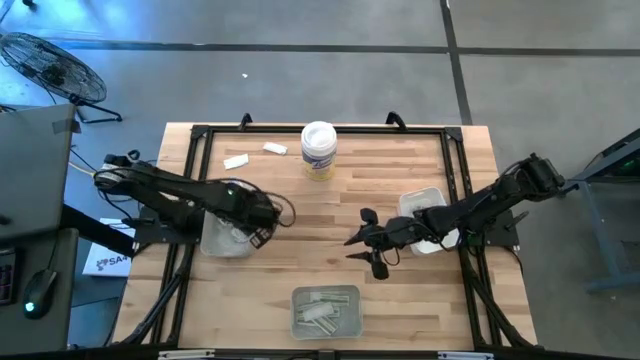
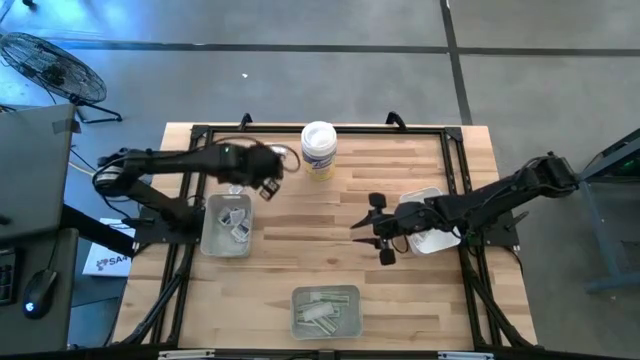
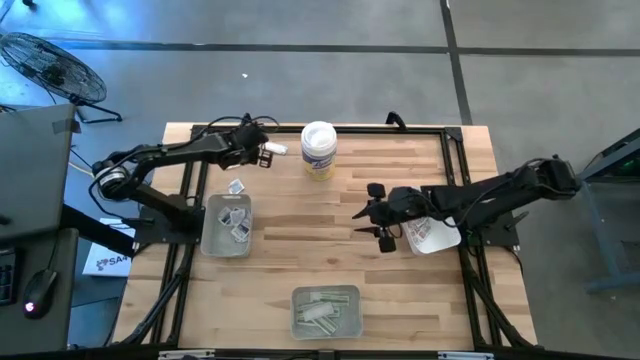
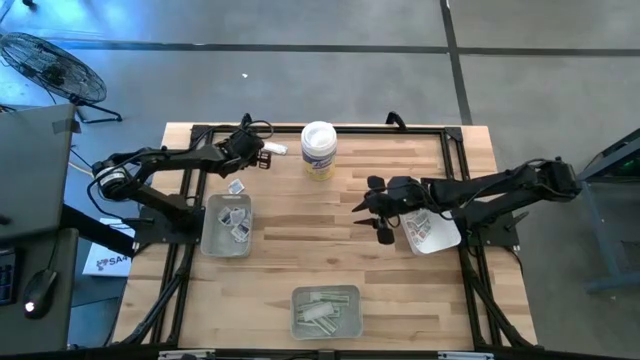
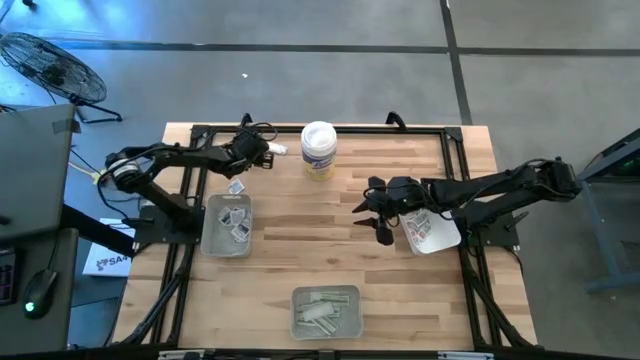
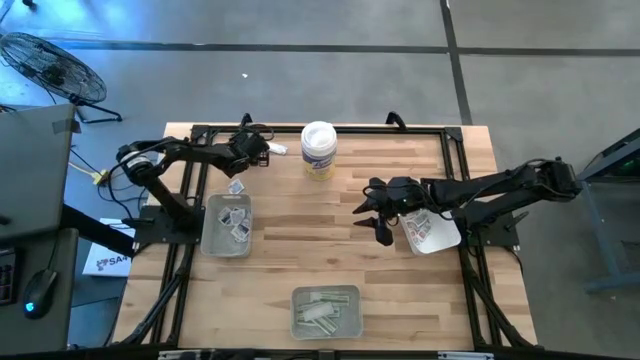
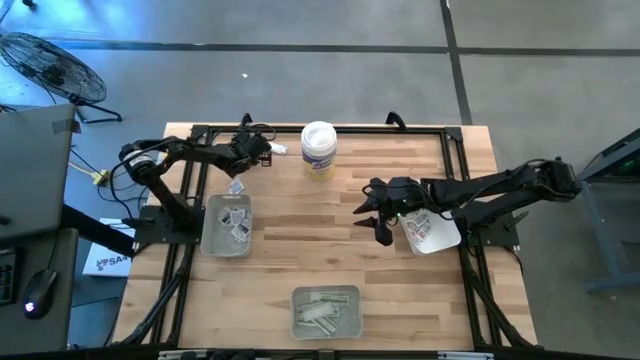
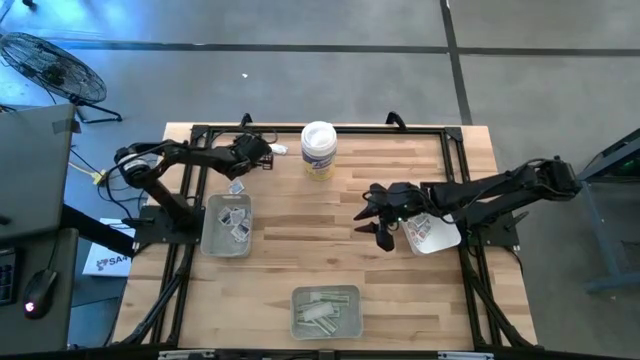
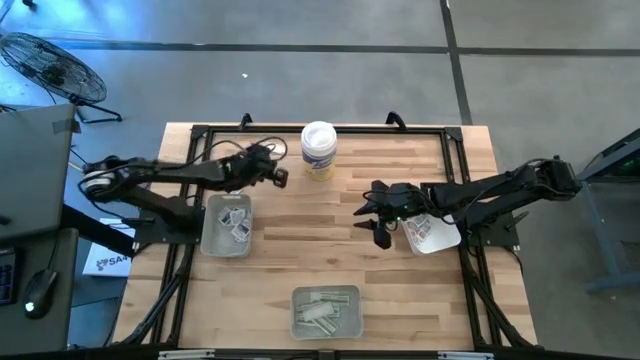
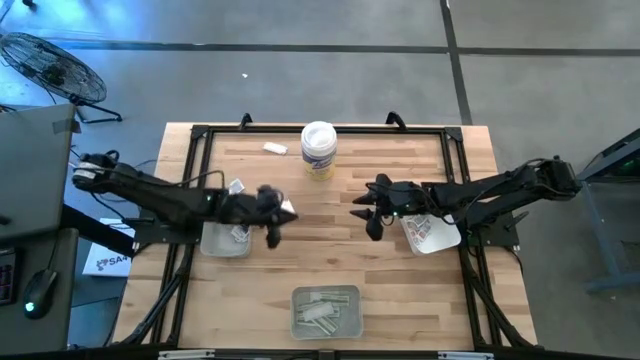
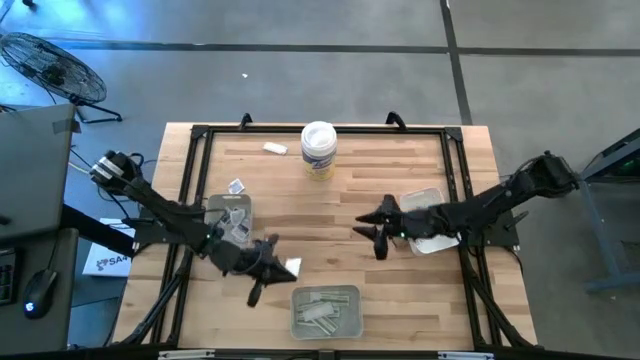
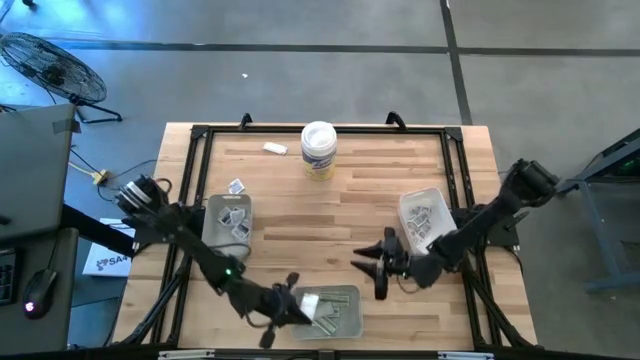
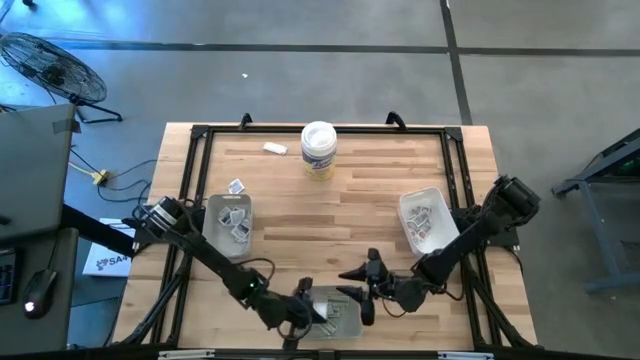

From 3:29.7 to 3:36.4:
Task: Pick & Place First Aid Supplies
Put the green bandage pack into the bottom gray bin

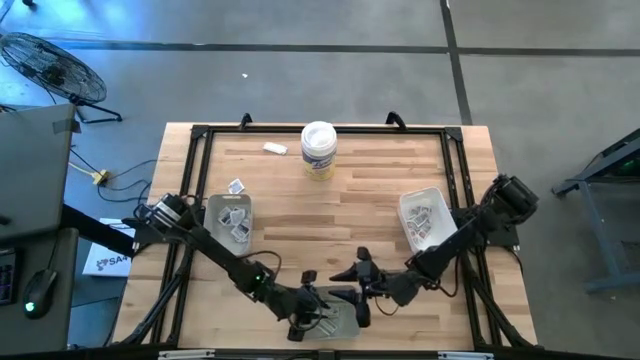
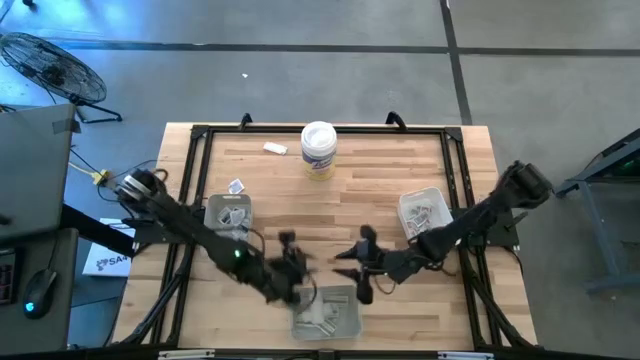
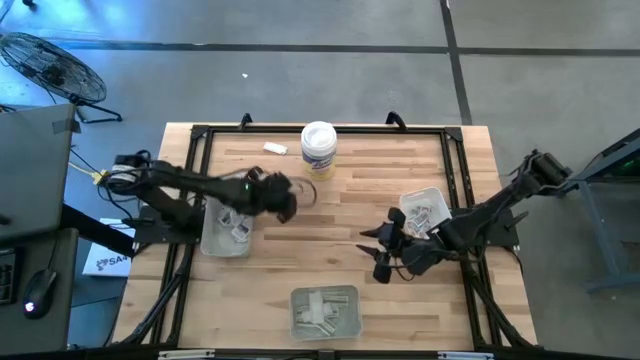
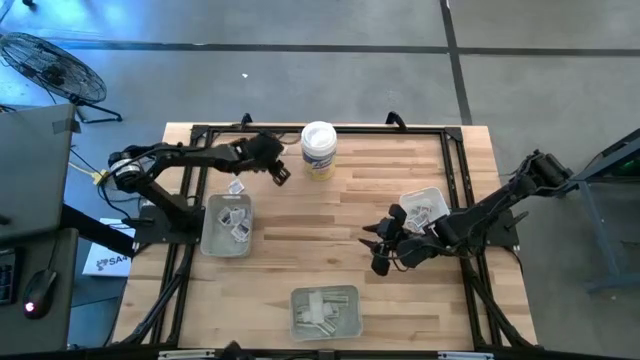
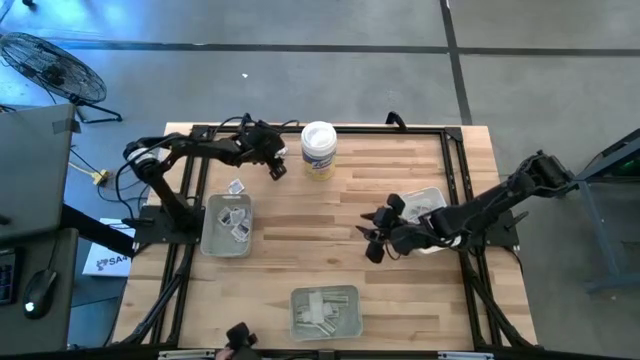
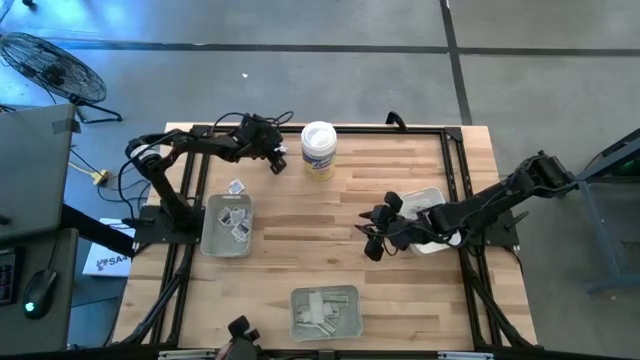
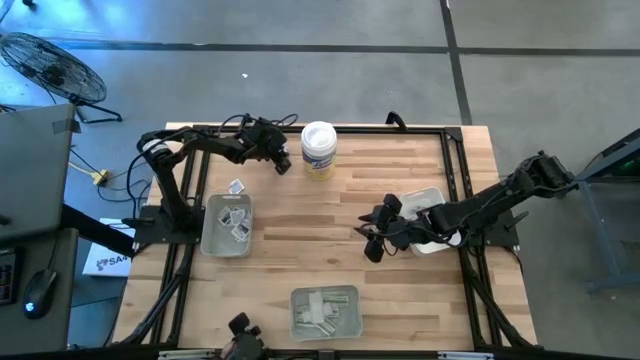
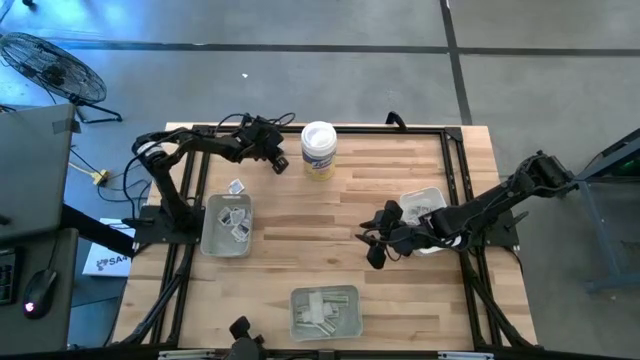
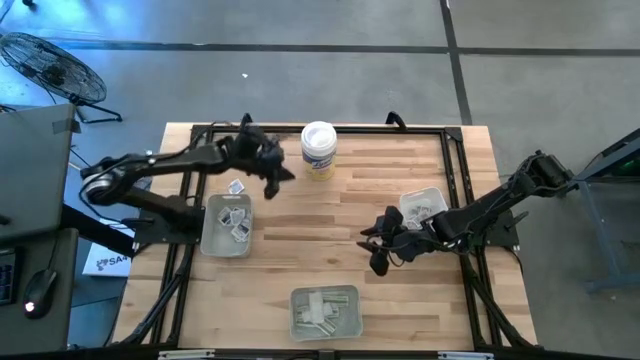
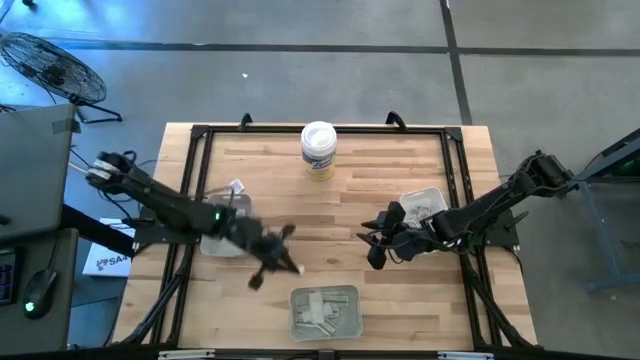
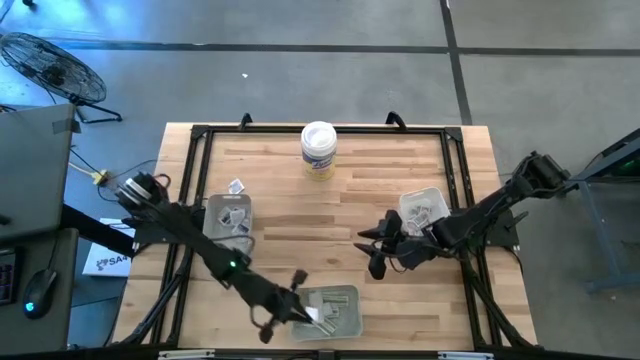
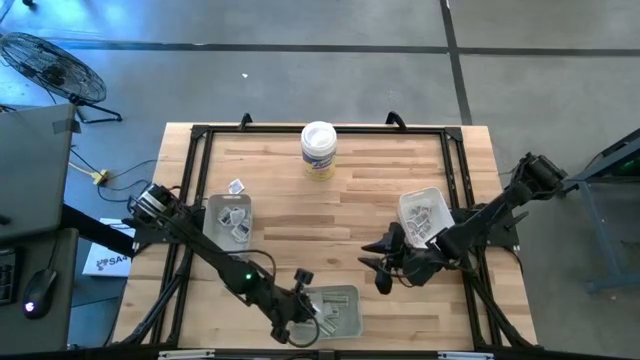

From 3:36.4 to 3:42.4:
Put the green bandage pack into the bottom gray bin

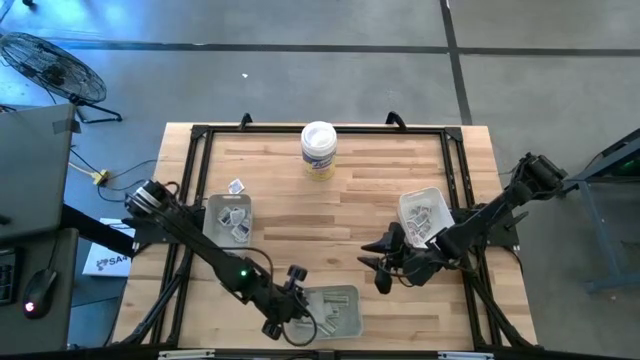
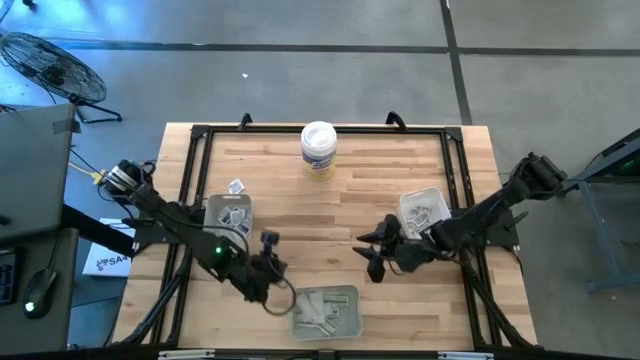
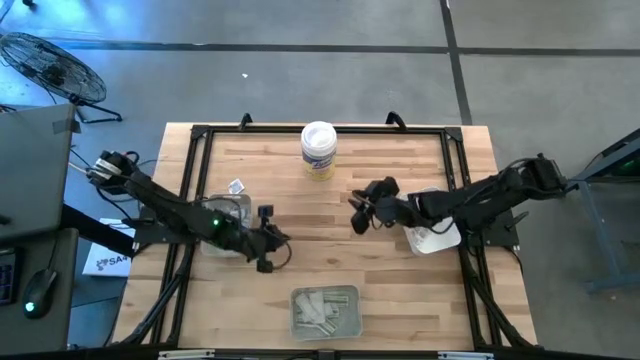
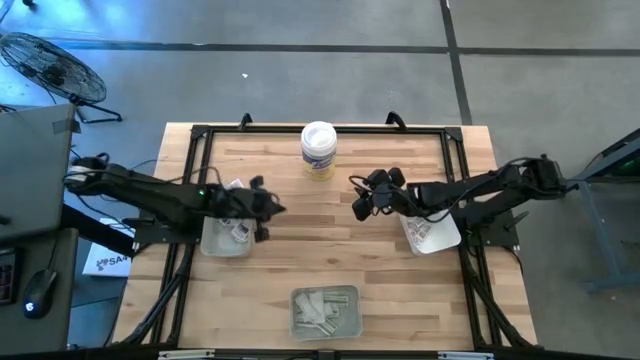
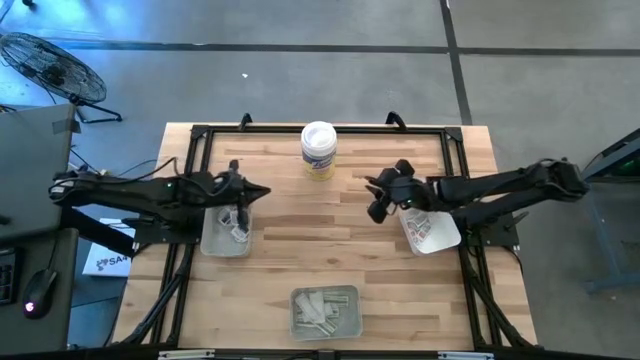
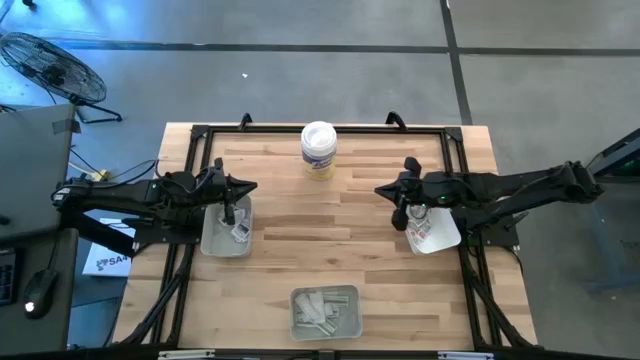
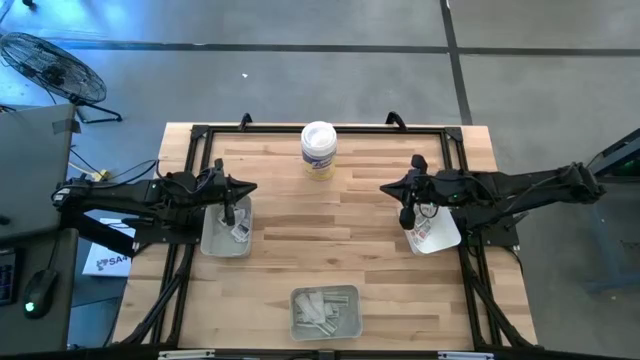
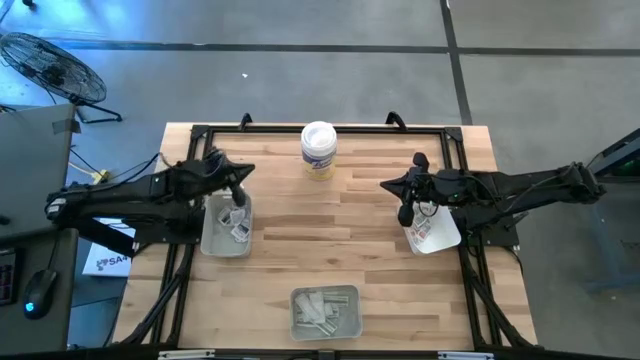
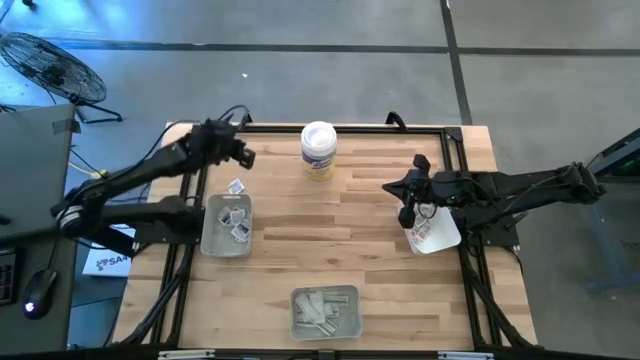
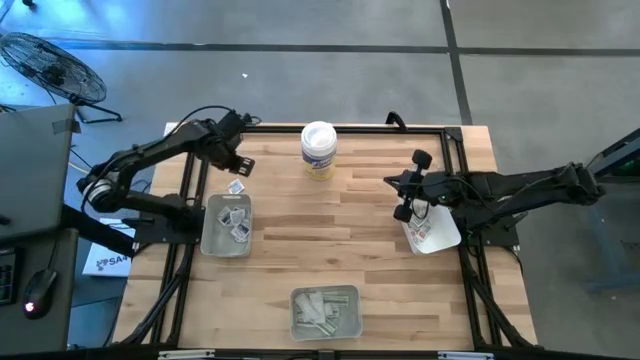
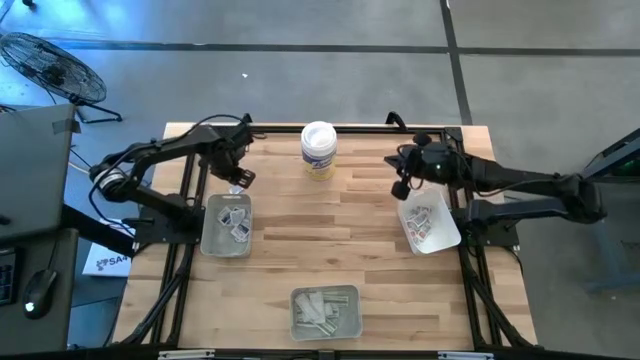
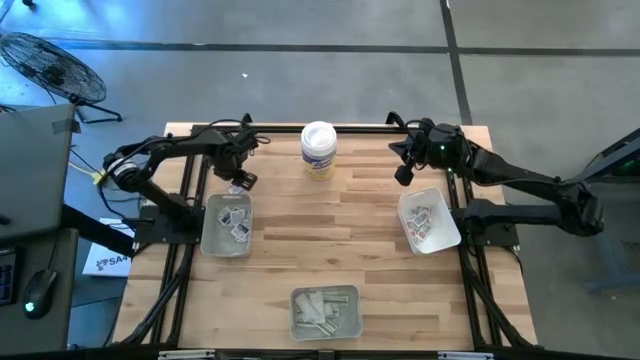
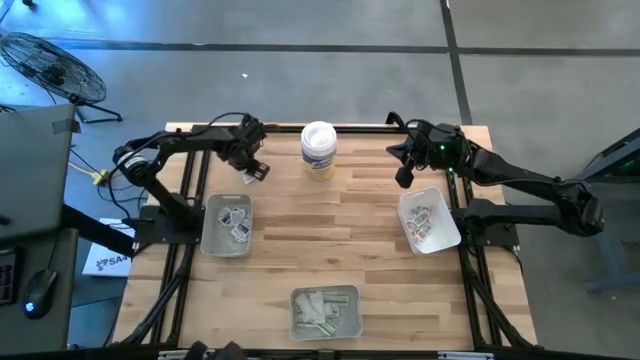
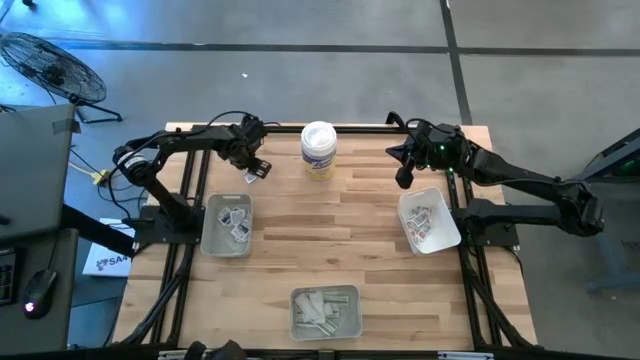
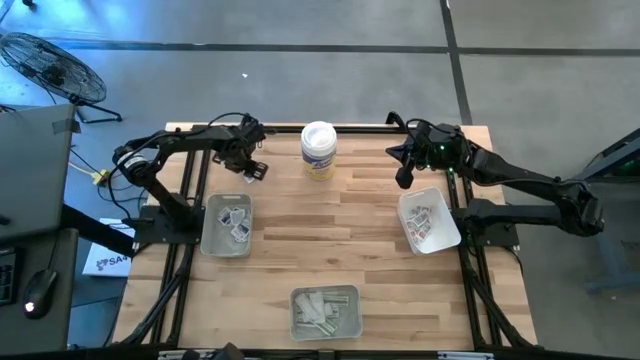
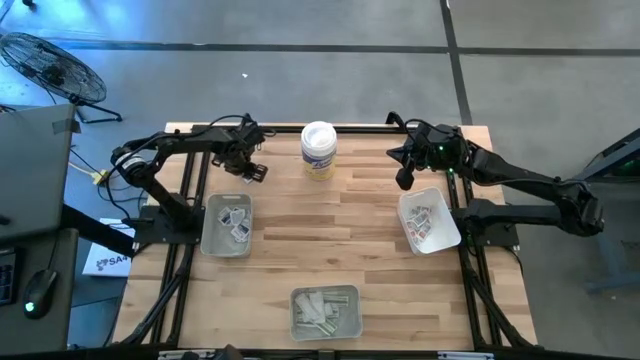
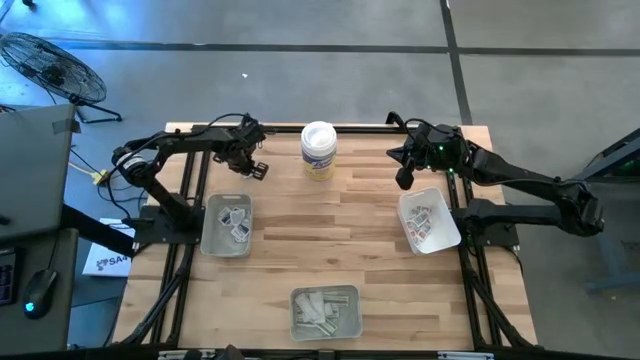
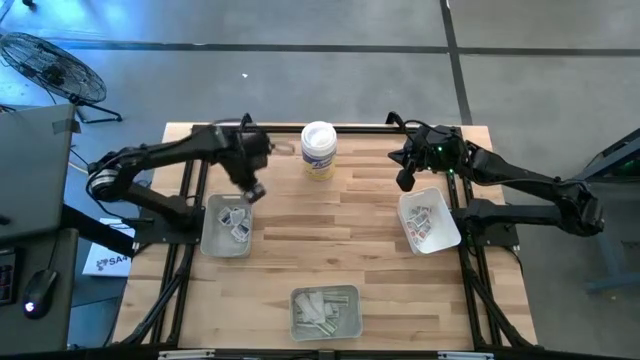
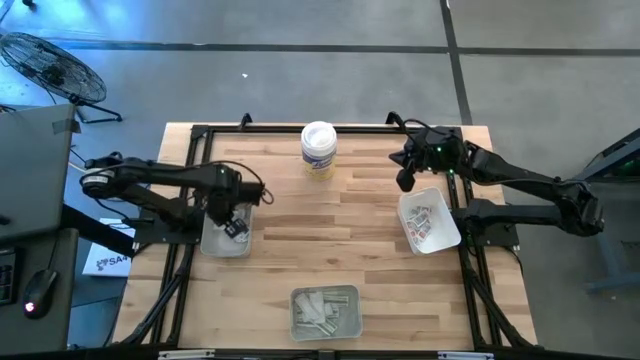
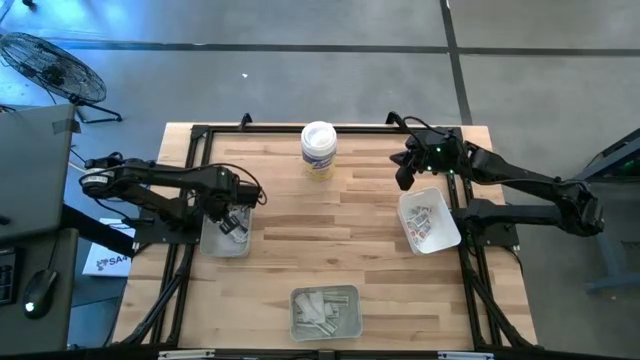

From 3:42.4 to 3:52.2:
Put the blue alcohol pad into the top gray bin
